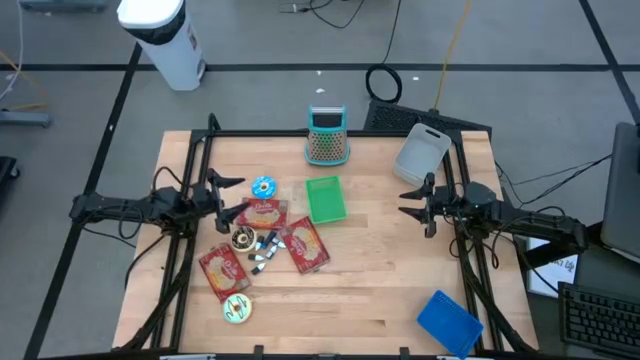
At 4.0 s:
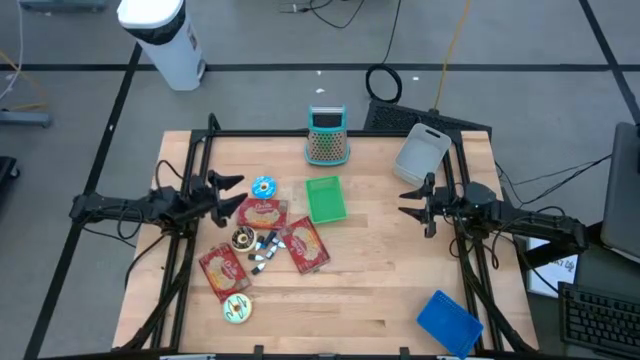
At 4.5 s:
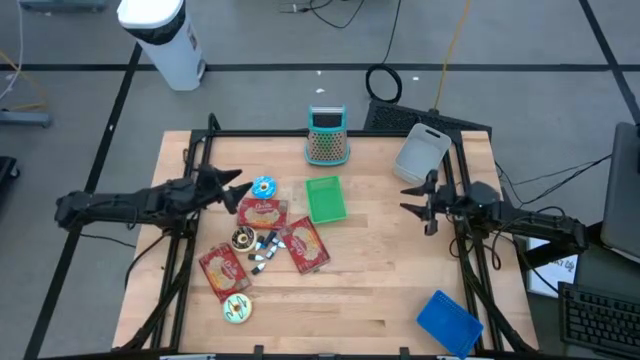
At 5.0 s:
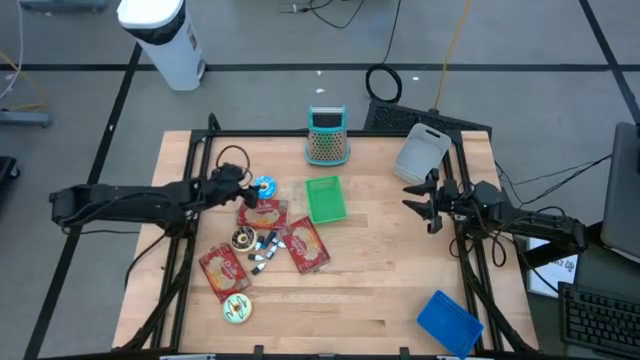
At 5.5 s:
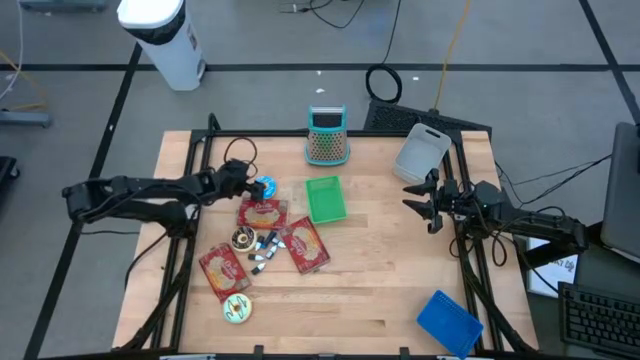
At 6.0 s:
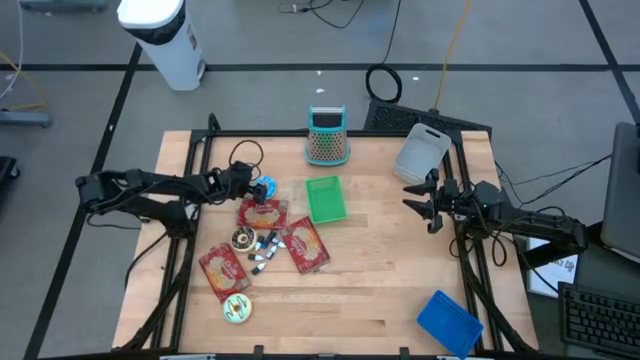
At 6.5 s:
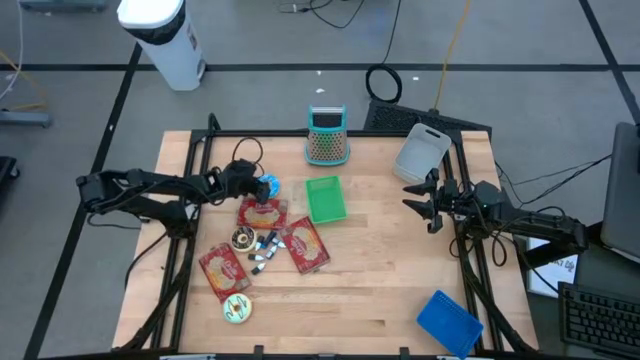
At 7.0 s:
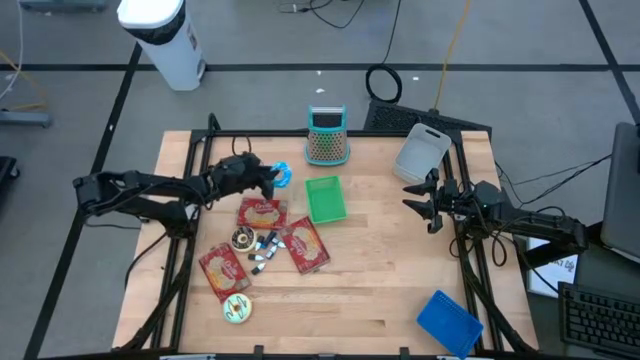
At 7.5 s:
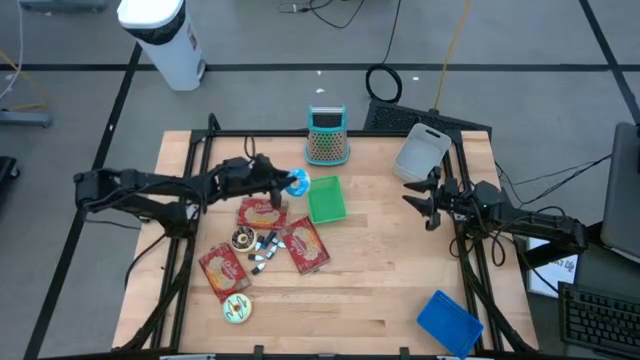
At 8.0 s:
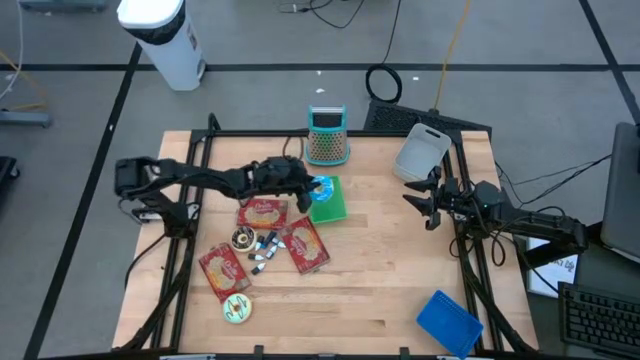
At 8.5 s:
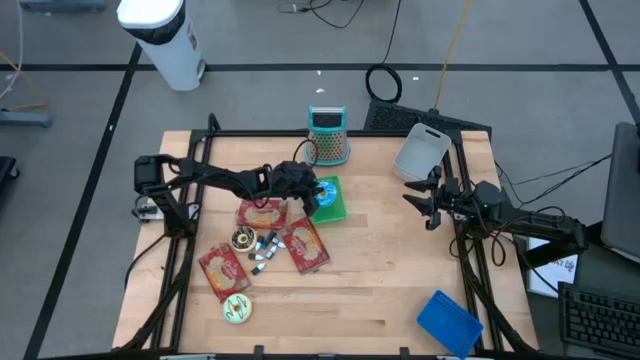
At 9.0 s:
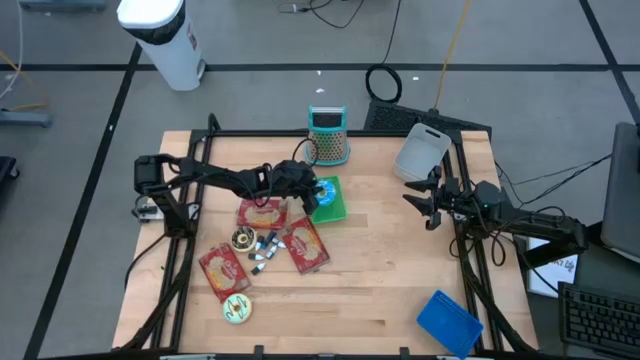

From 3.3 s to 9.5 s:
Put the blue donut into the green bin

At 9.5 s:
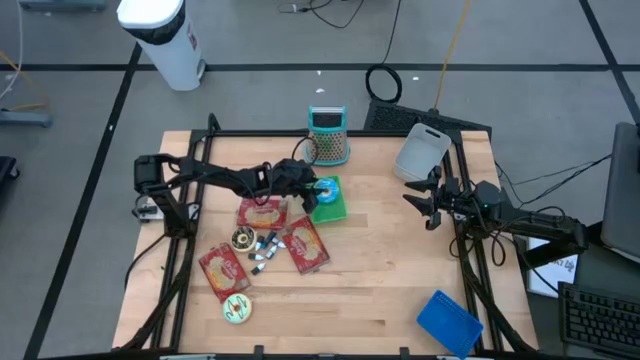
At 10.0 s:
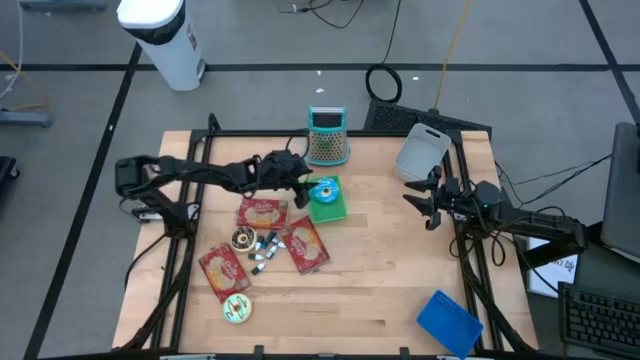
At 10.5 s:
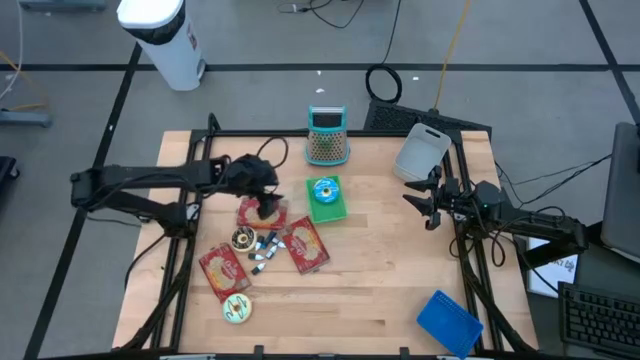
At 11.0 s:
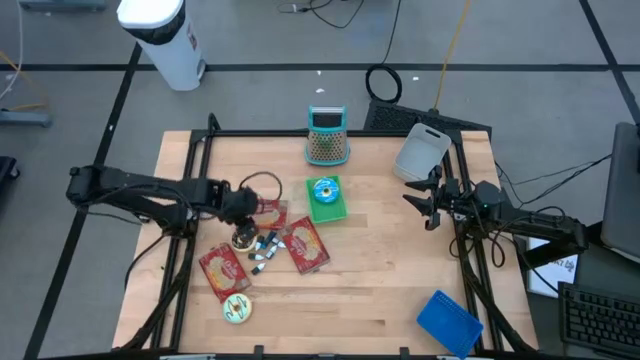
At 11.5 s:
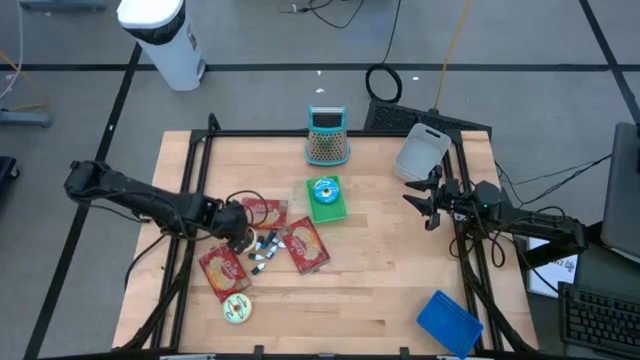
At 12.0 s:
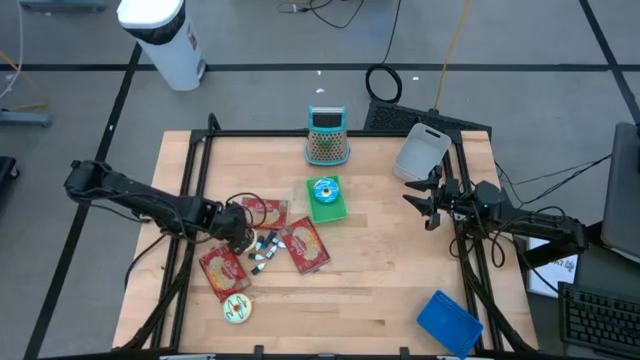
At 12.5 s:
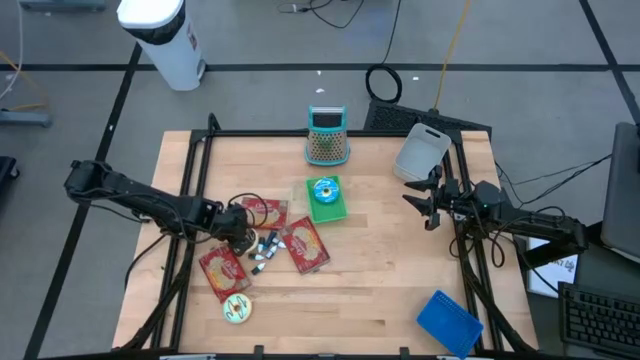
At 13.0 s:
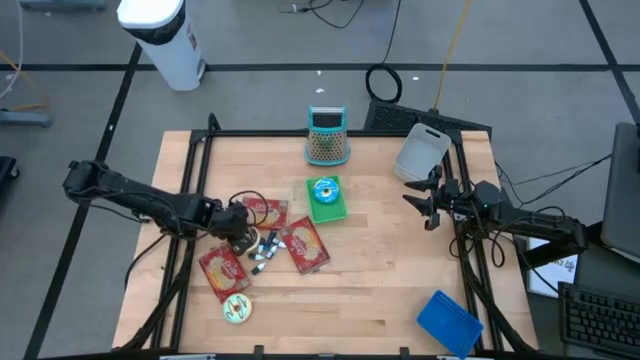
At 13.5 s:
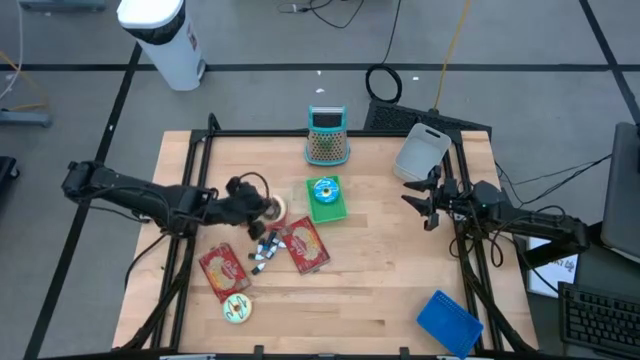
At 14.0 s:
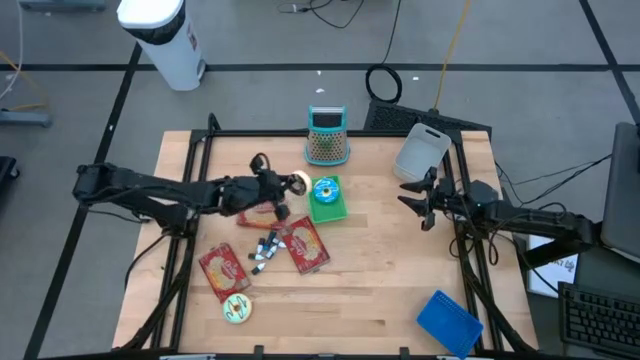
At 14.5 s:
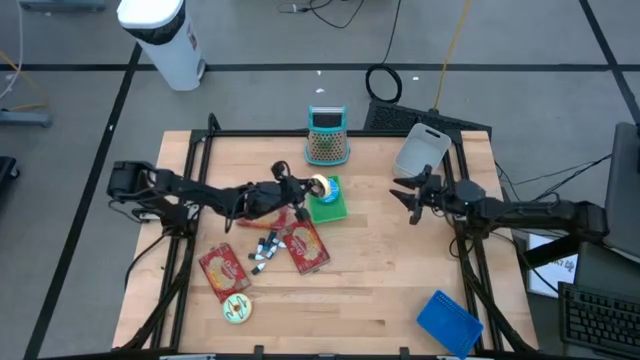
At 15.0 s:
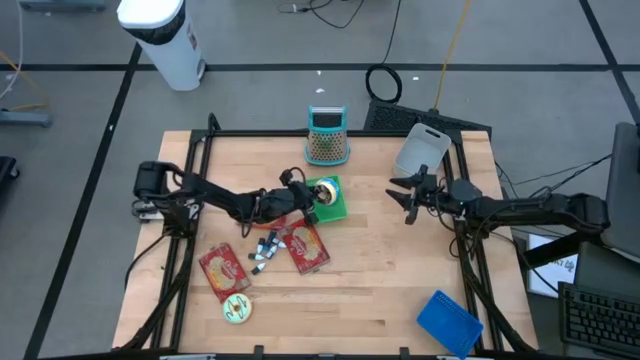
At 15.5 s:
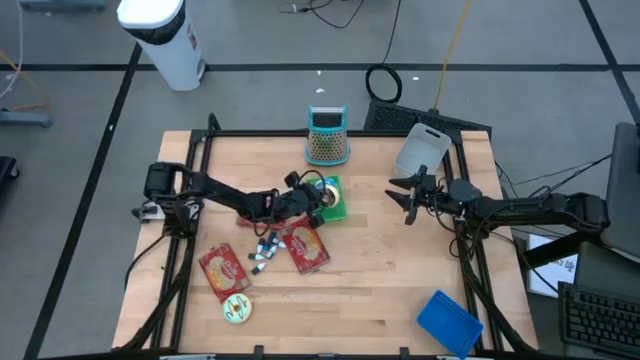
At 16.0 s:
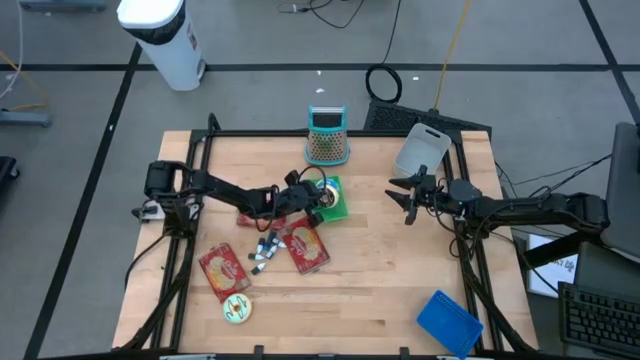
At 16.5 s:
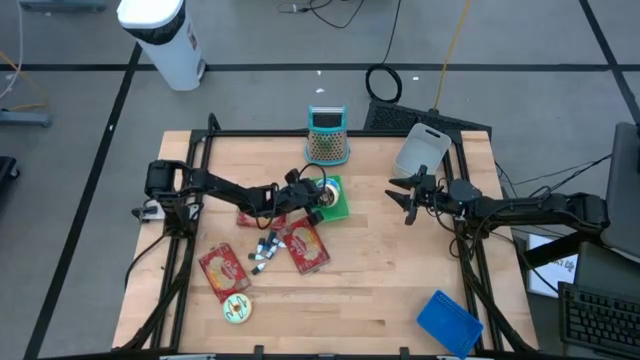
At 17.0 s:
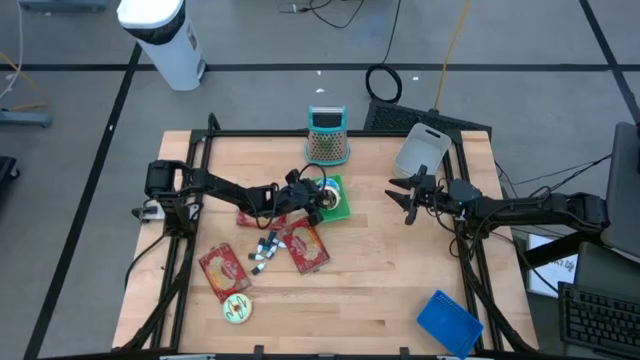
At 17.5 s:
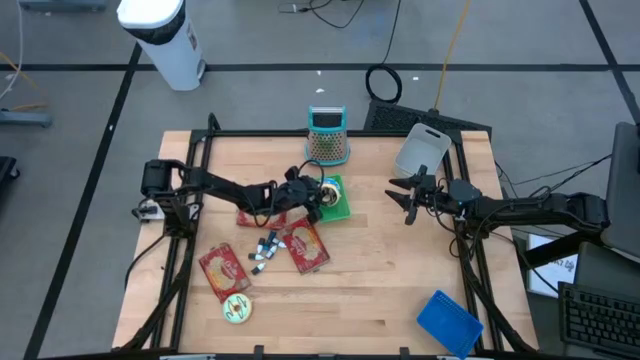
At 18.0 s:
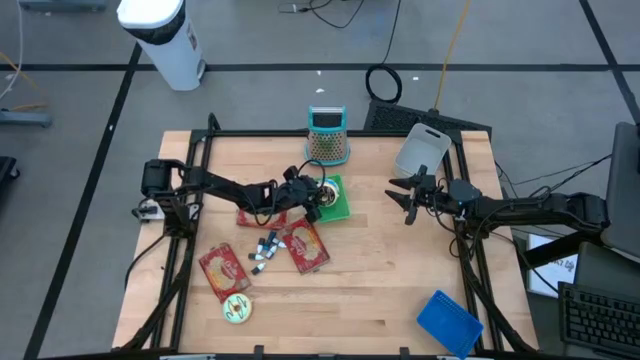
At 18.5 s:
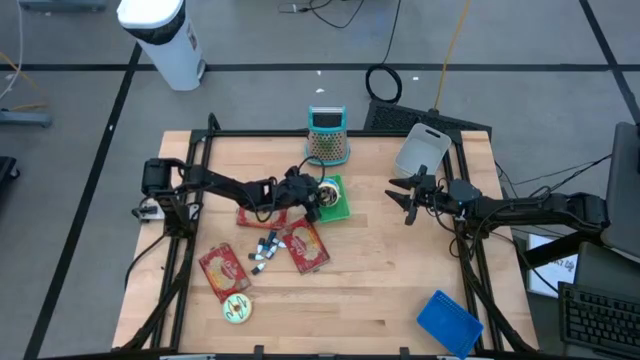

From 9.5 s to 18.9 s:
Put the black donut into the green bin

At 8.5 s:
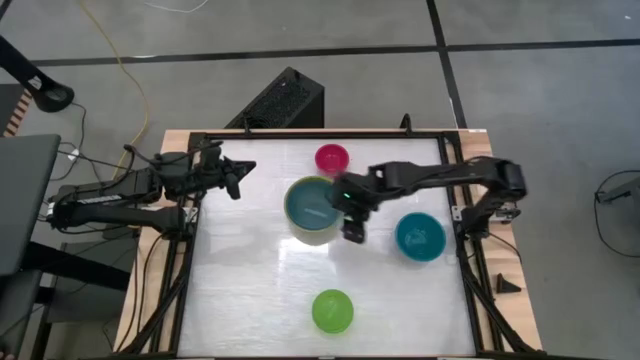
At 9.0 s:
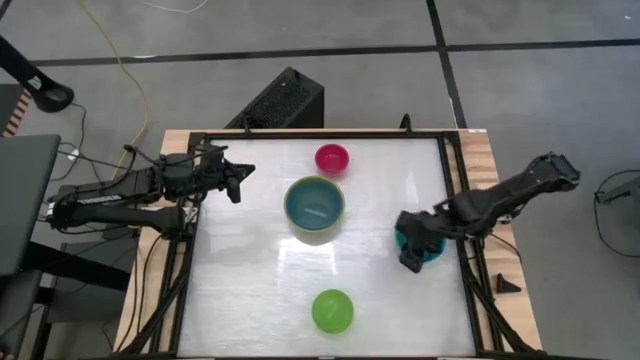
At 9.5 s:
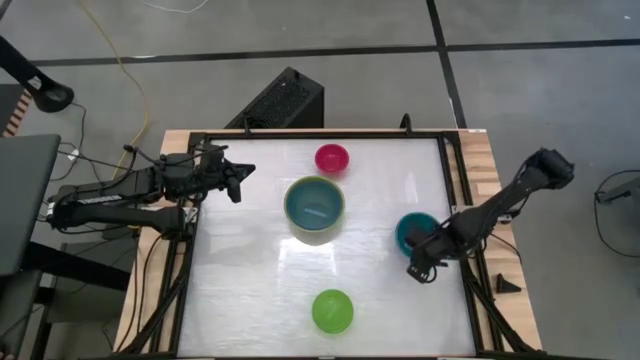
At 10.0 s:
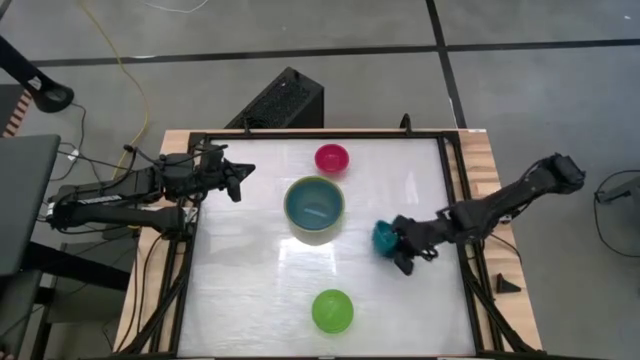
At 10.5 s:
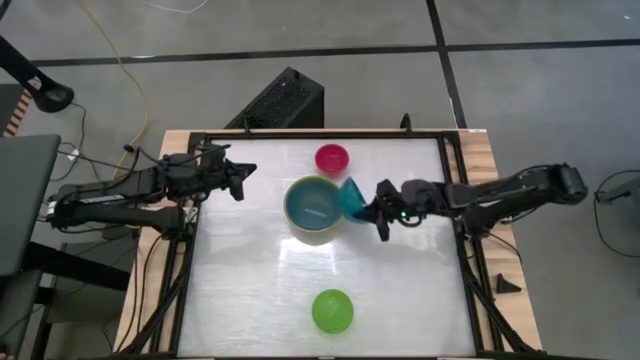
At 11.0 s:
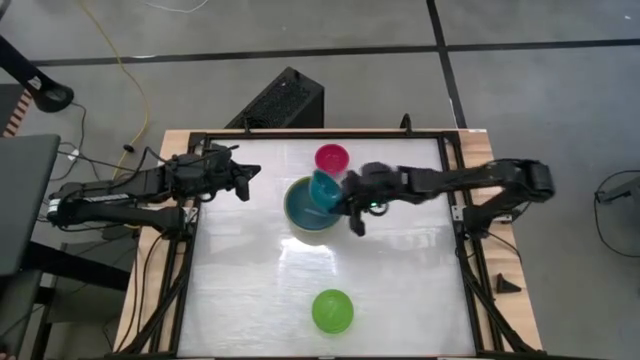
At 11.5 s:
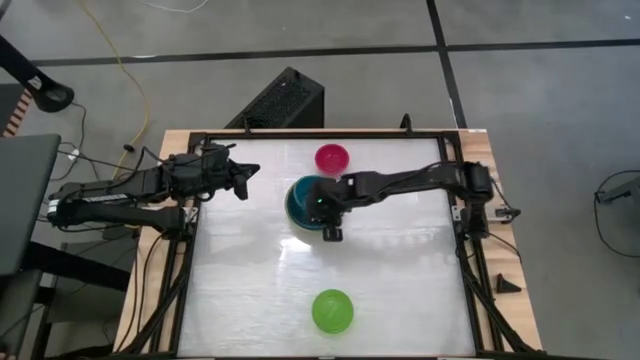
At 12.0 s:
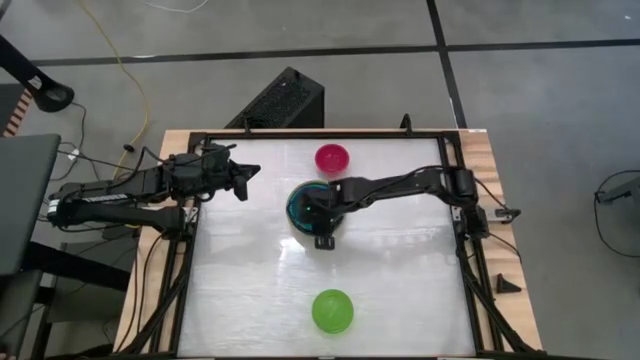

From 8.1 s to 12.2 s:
Stack the dark blue bowl on top of the blue bowl

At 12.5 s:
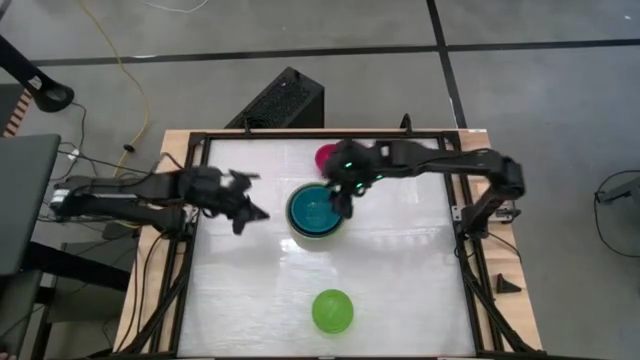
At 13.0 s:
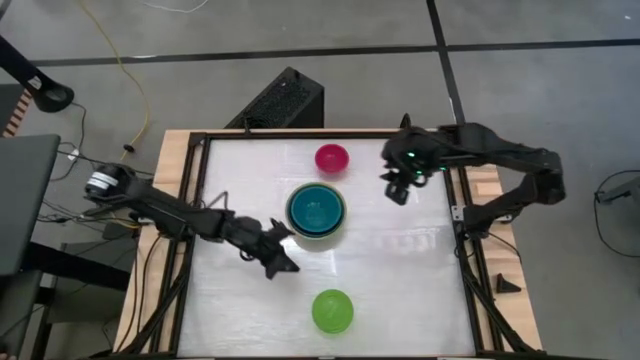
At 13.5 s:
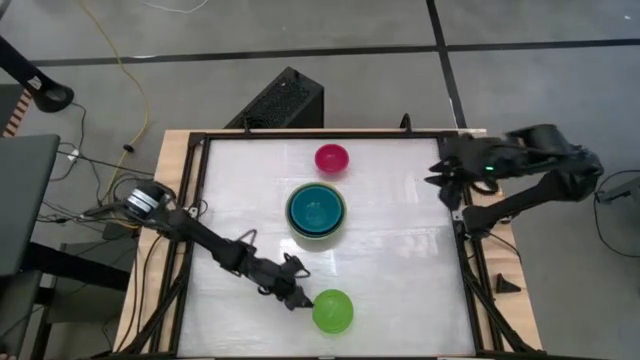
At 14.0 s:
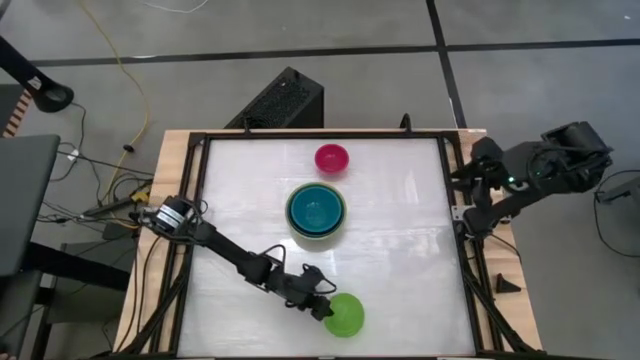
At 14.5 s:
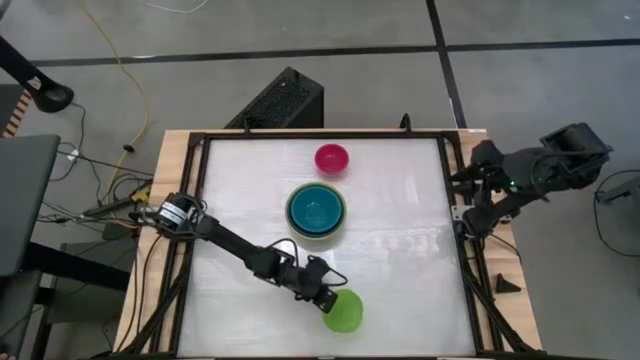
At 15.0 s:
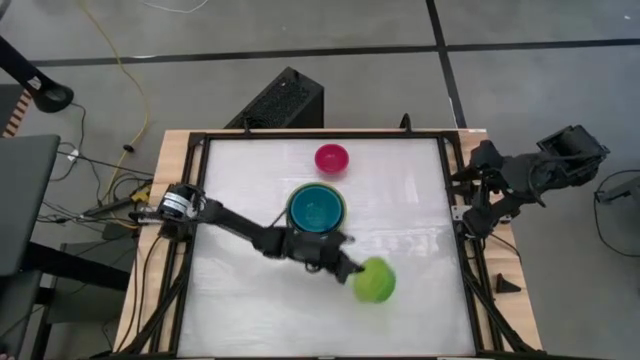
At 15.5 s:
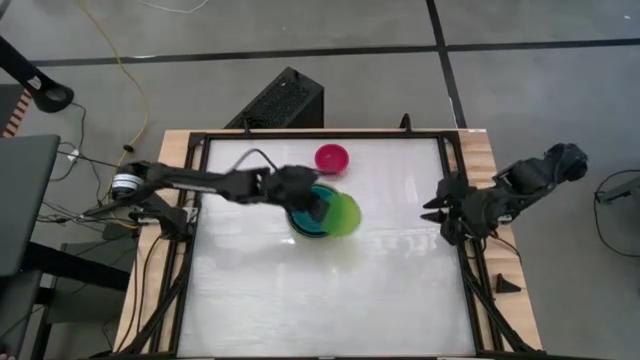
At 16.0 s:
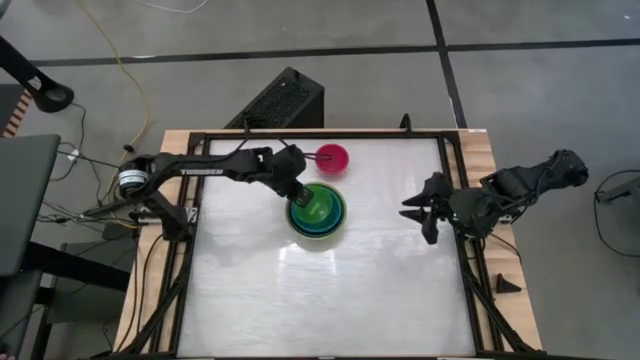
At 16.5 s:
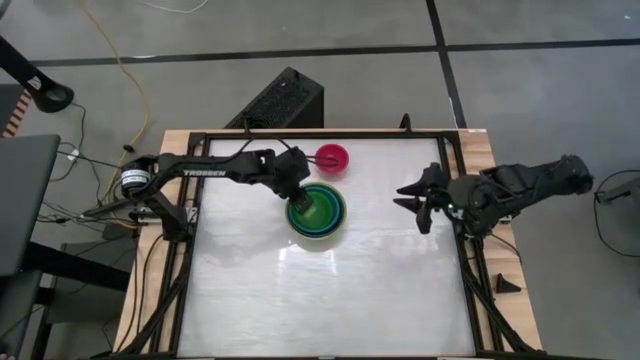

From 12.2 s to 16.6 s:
Stack the green bowl on top of the dark blue bowl
